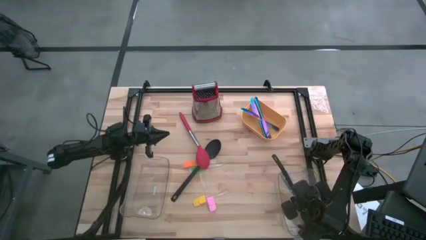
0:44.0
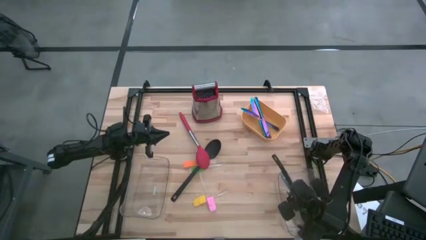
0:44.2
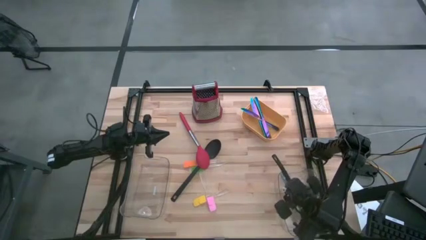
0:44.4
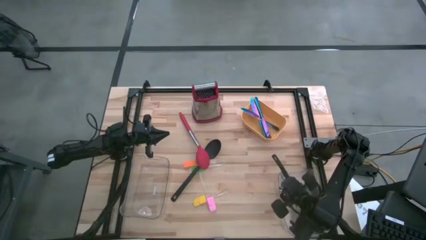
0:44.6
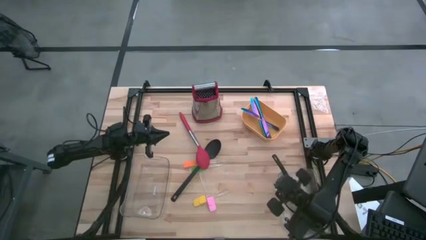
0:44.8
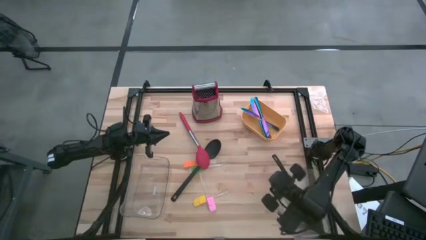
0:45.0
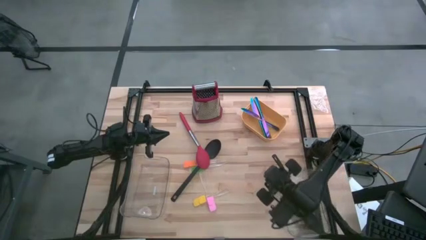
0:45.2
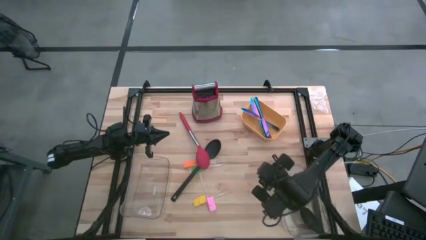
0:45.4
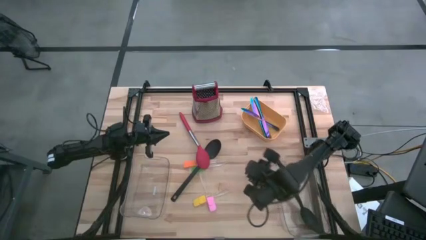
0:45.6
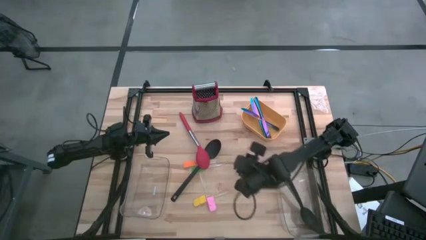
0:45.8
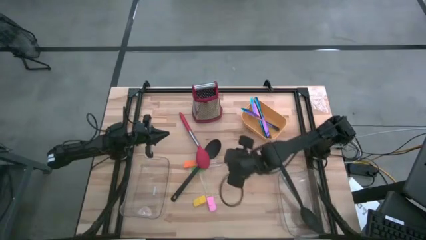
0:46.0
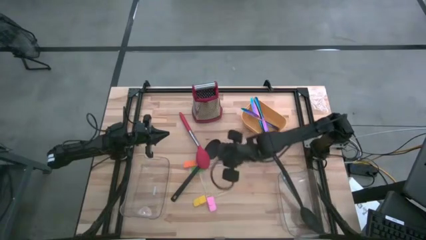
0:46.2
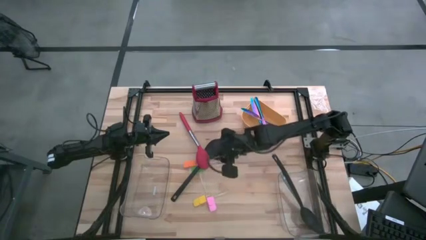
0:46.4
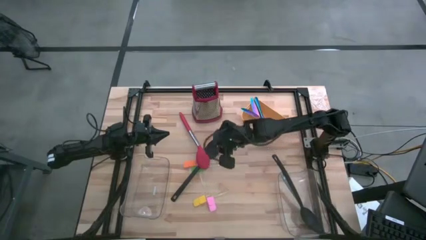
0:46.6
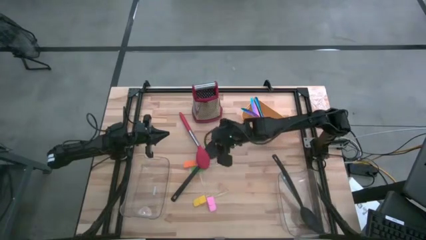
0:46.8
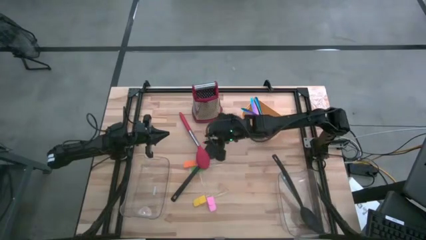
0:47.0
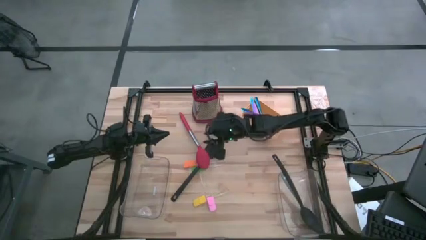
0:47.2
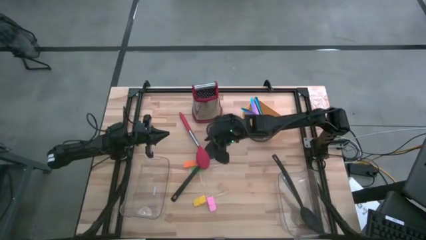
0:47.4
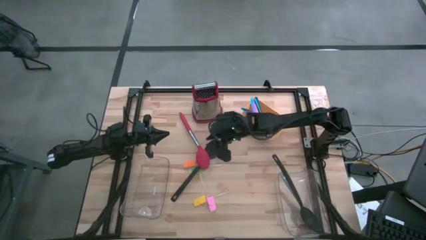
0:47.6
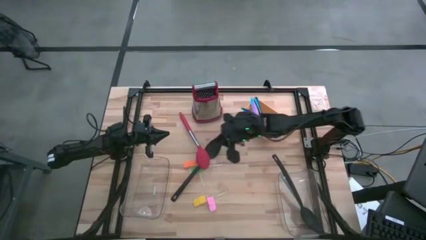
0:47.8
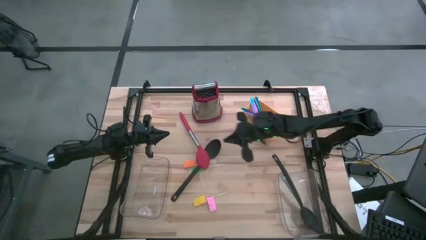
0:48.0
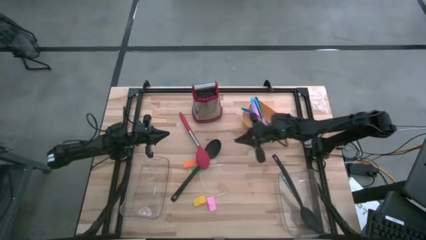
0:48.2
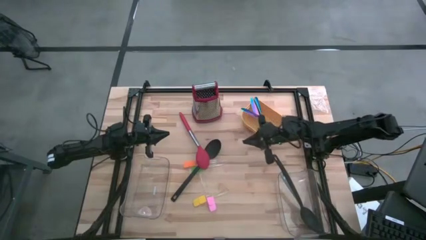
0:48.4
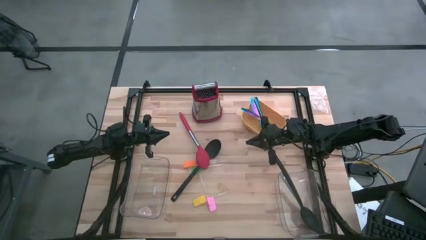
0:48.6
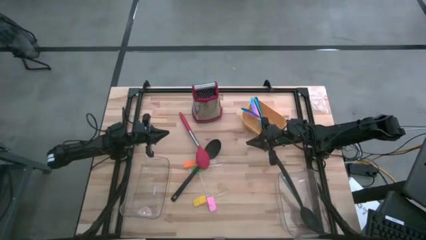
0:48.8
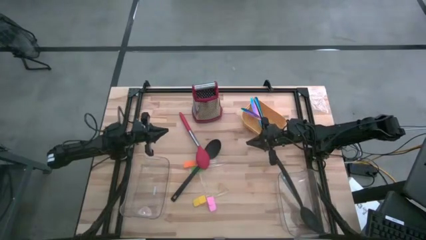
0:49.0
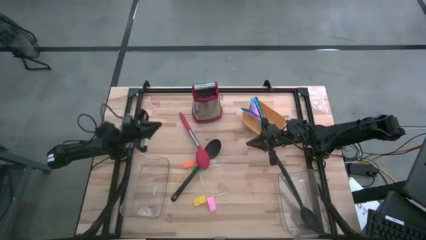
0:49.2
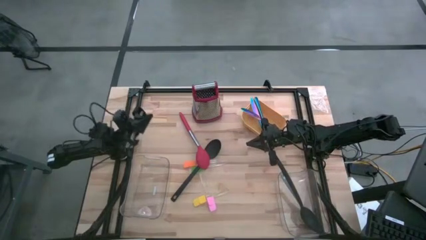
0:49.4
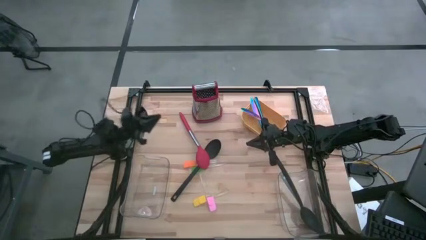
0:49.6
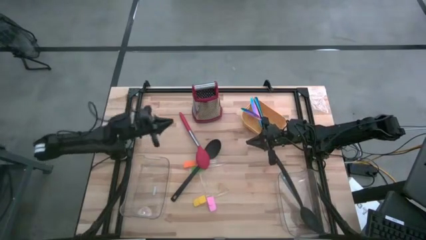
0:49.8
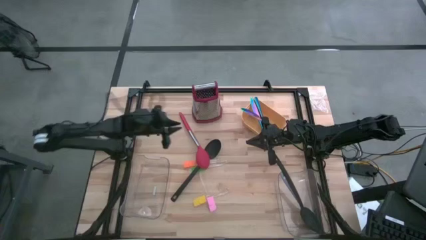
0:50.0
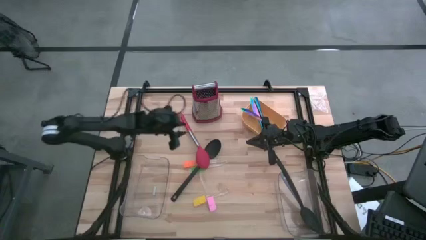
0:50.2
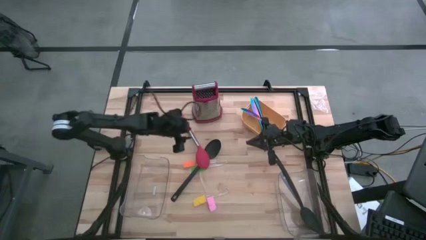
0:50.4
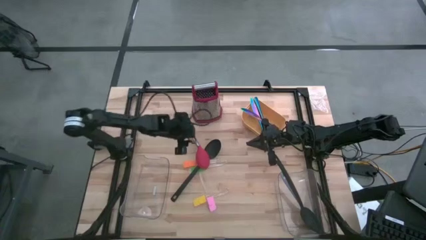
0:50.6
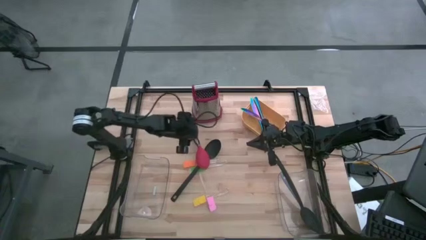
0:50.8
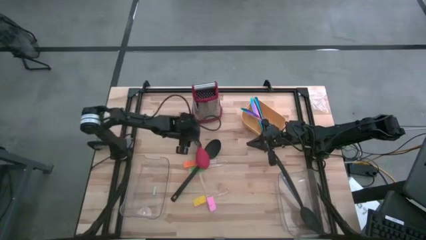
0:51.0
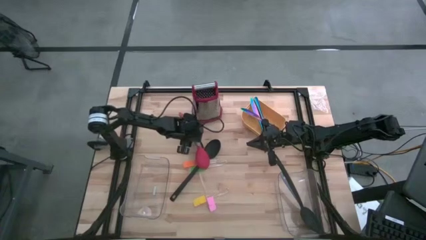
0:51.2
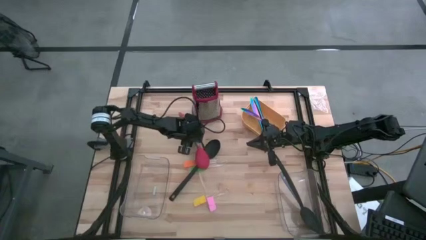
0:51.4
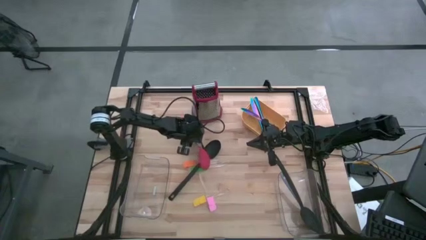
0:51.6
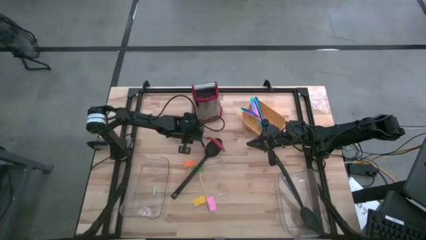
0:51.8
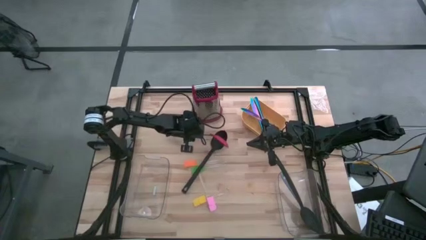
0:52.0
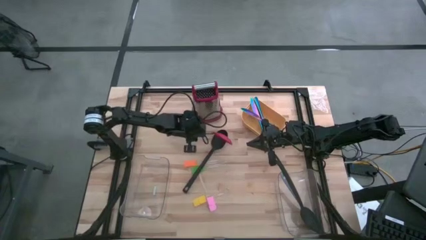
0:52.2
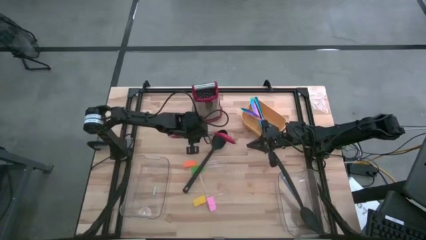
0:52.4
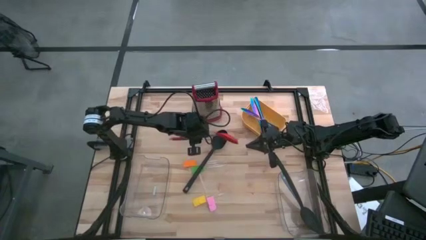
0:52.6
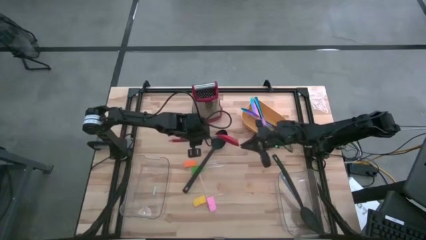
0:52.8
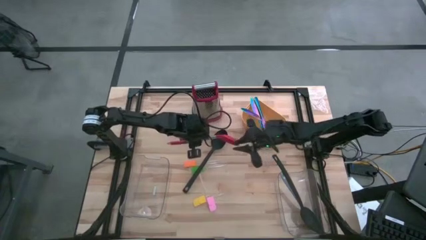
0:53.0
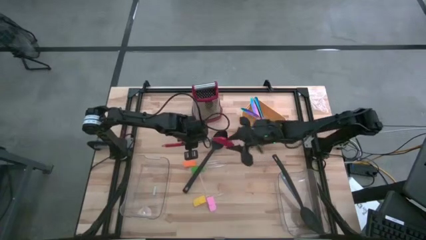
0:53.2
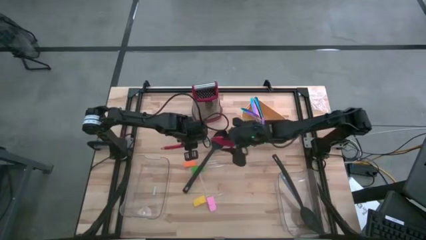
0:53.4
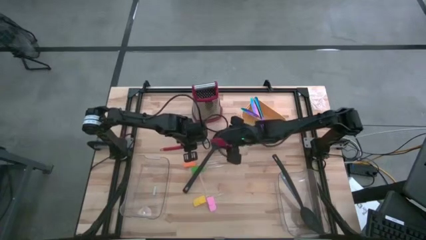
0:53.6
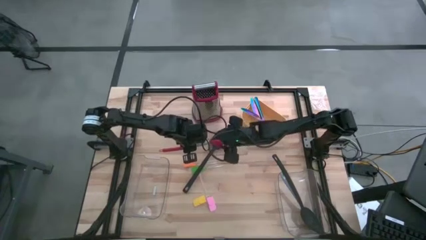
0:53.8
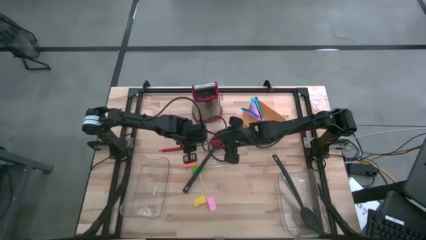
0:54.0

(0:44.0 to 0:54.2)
Task: Pick & Place Kitchen Items
Put the red slotted spoon into the right transparent bin

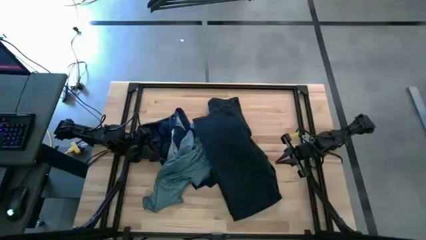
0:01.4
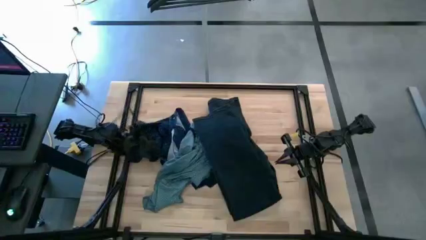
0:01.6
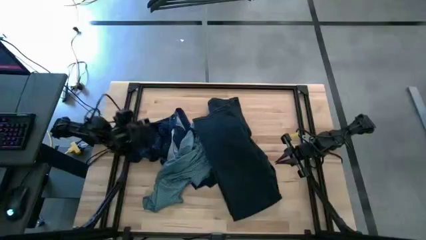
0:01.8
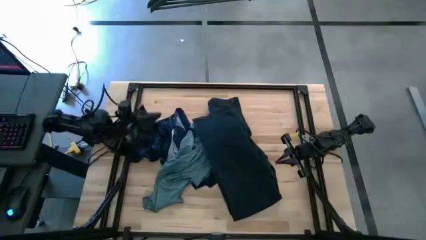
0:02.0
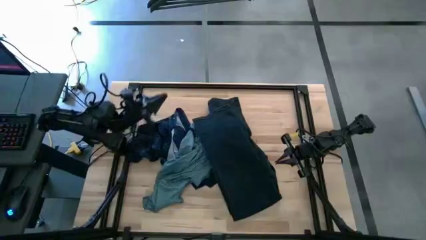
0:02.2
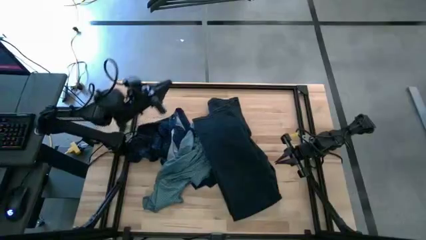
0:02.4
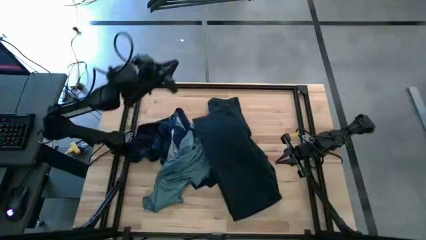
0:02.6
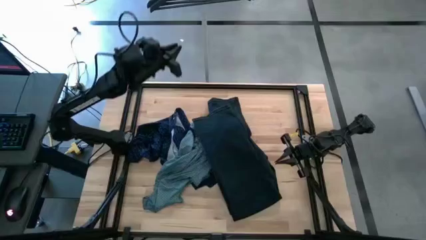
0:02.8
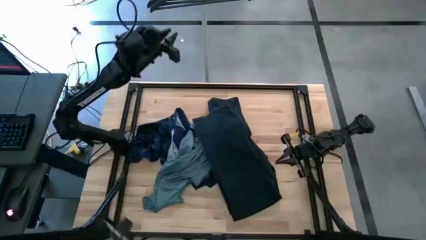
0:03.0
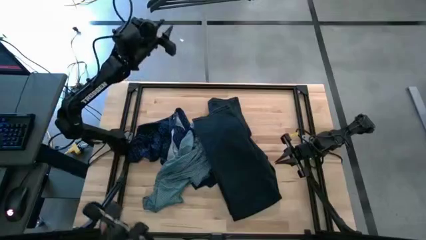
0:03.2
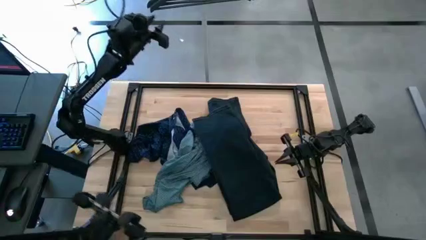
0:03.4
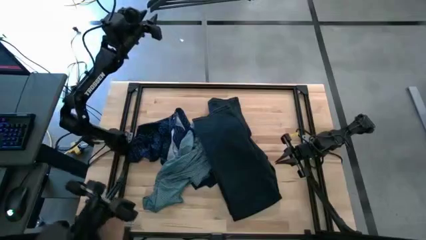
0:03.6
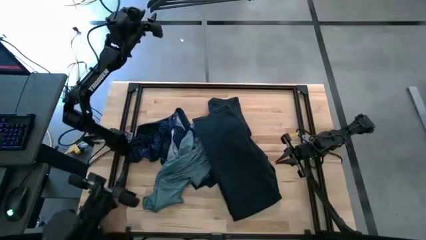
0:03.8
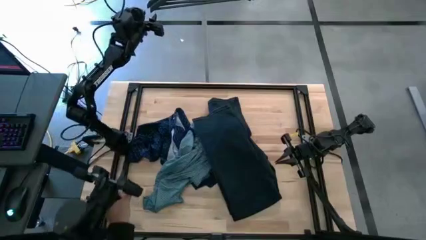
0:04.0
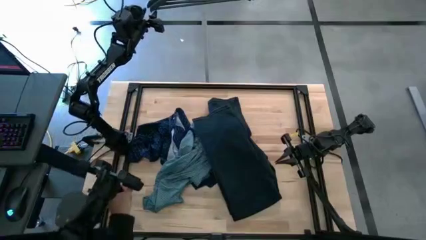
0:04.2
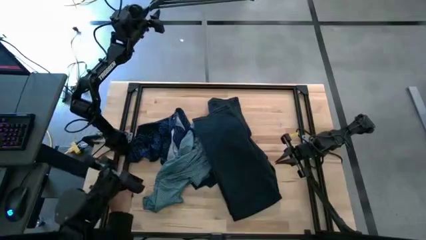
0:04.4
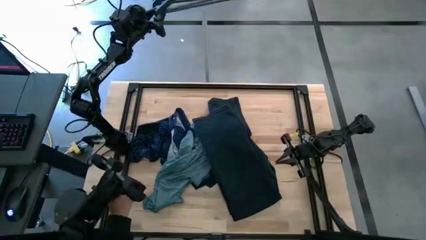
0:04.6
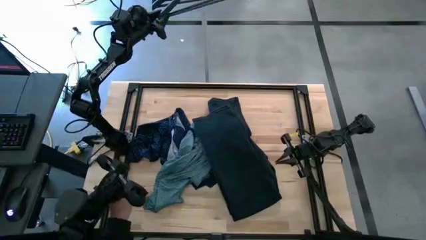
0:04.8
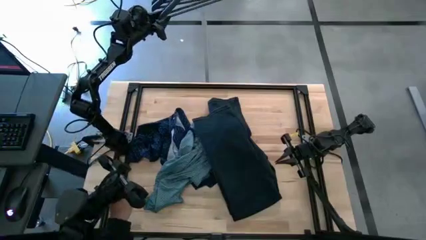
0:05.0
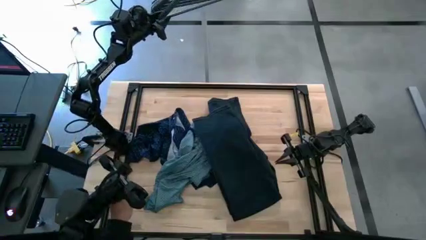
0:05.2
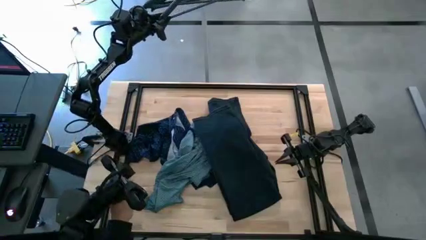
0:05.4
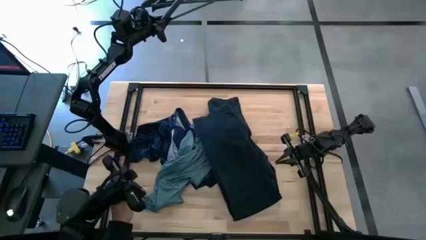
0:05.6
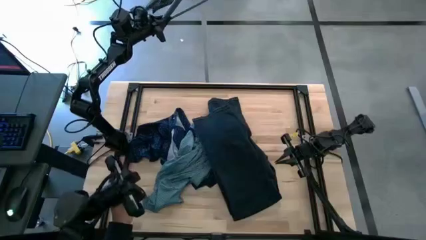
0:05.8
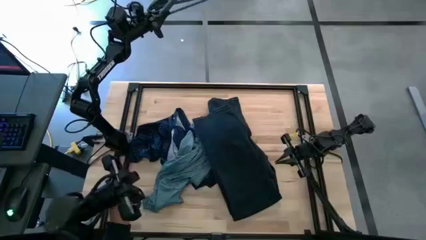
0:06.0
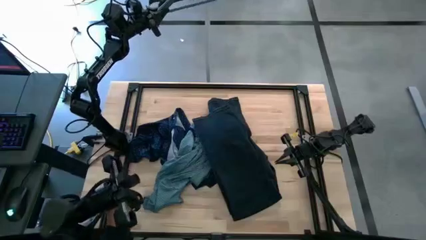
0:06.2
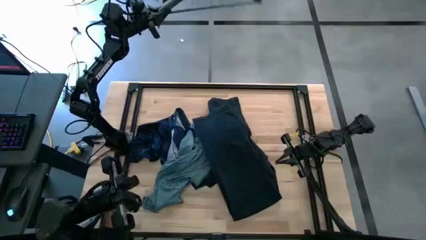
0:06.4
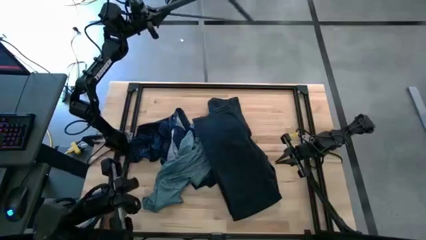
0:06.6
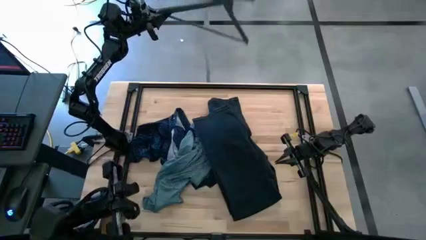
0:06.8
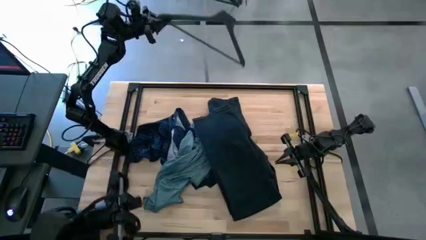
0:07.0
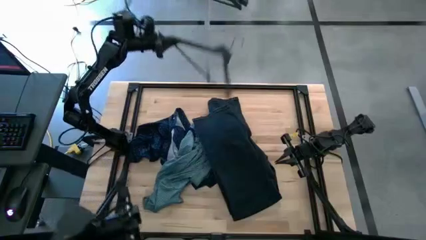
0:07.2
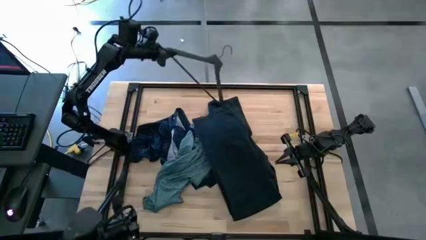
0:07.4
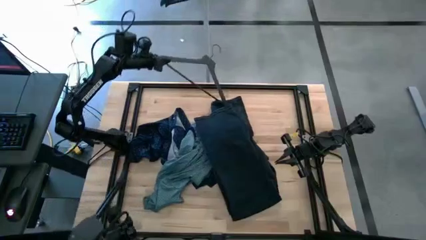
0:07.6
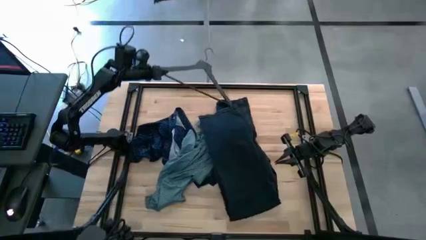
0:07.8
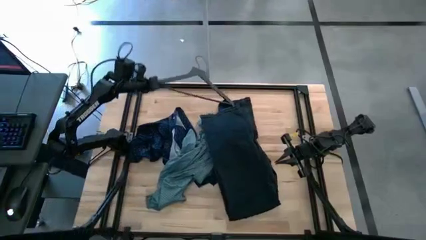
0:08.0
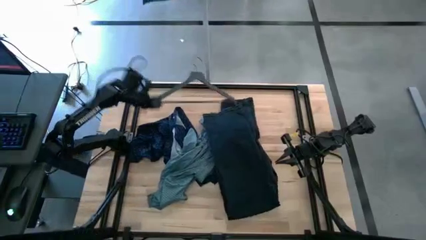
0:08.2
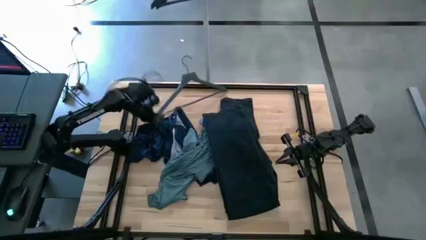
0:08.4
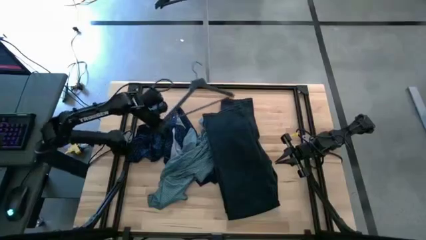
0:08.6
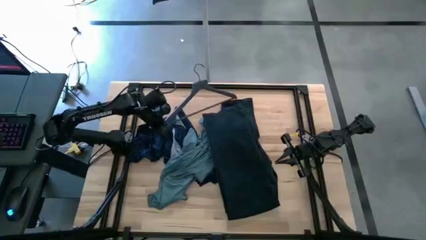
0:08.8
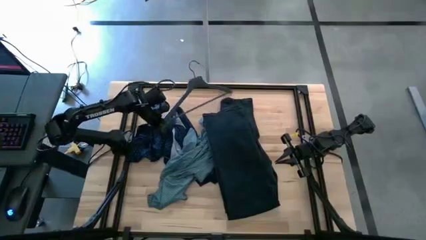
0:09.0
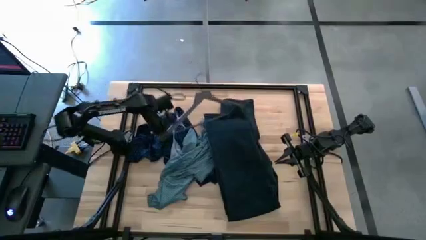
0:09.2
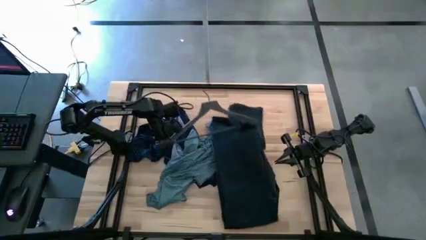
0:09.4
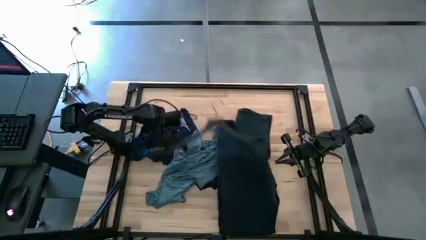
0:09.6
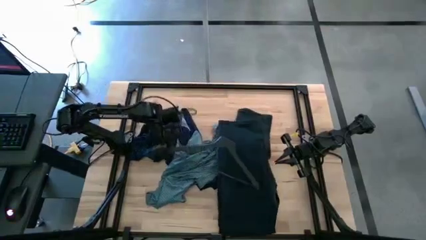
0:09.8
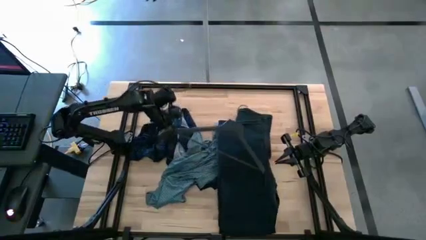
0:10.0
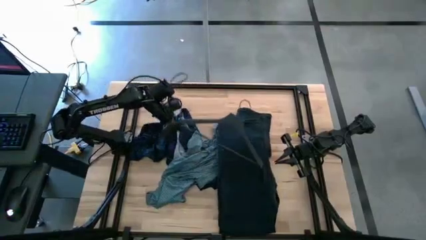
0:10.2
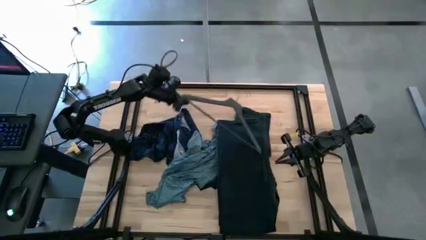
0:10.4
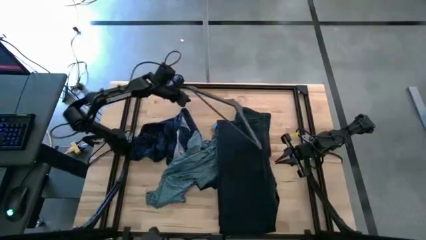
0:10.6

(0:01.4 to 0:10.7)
Task: Hang clothes
Unhang the hanger from the hanger rack
